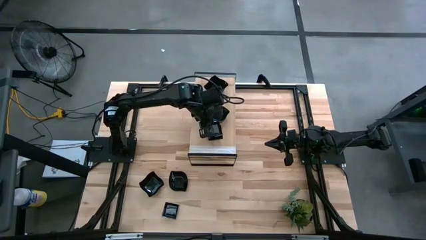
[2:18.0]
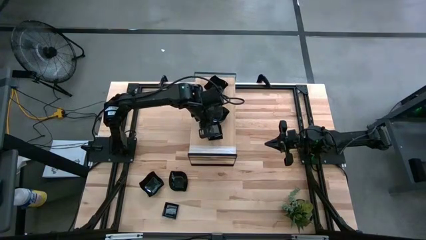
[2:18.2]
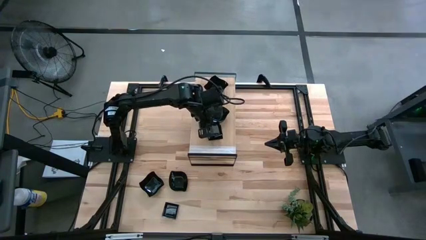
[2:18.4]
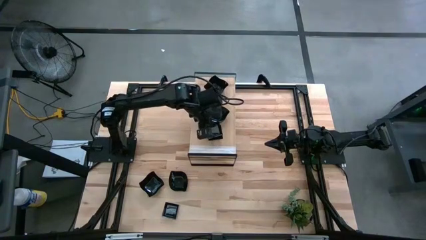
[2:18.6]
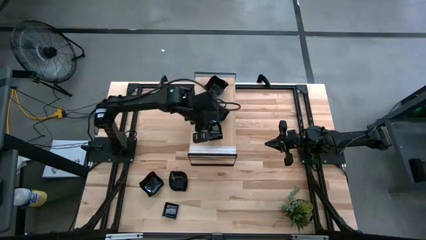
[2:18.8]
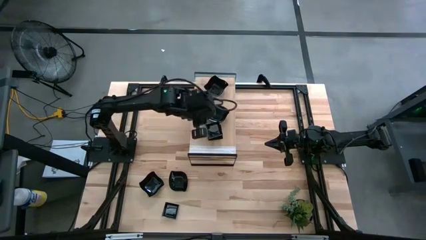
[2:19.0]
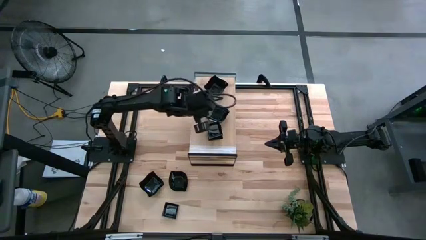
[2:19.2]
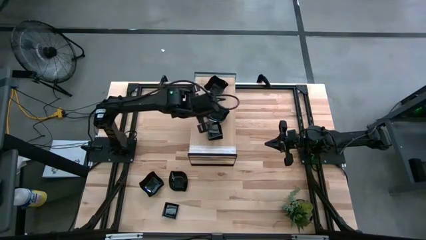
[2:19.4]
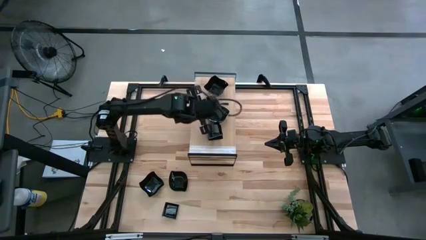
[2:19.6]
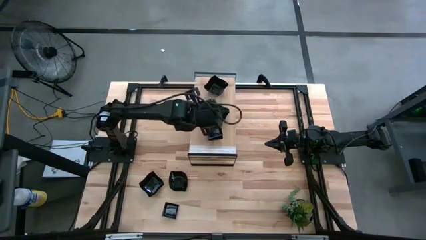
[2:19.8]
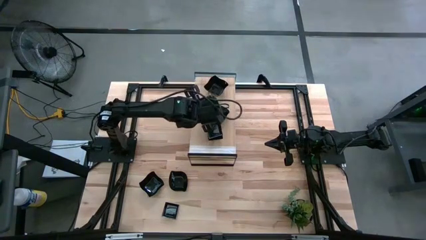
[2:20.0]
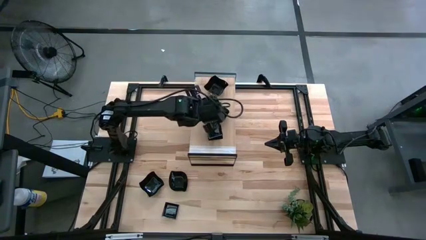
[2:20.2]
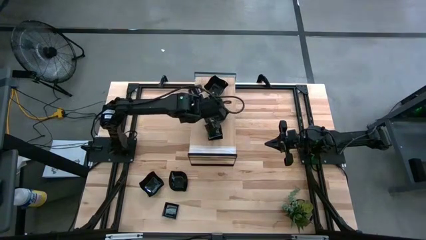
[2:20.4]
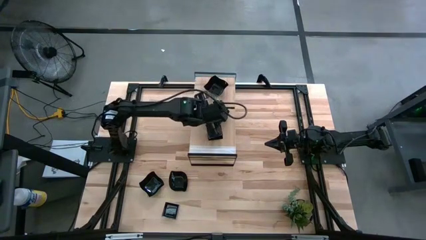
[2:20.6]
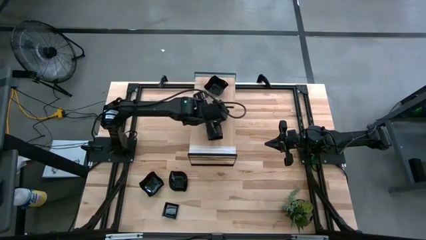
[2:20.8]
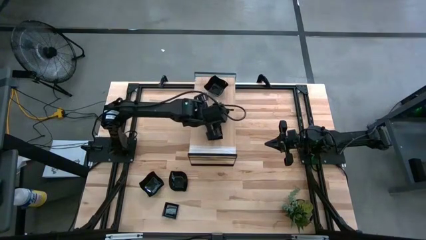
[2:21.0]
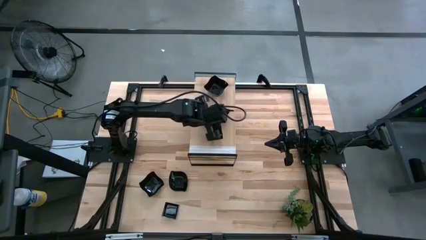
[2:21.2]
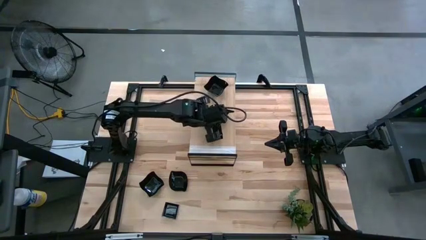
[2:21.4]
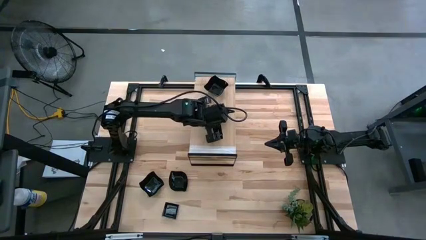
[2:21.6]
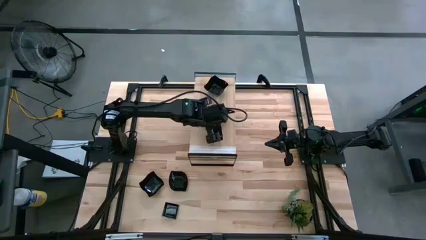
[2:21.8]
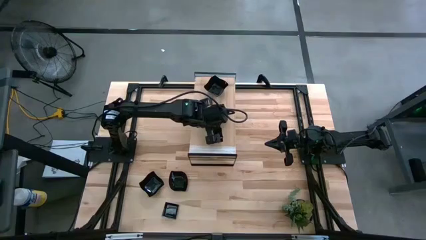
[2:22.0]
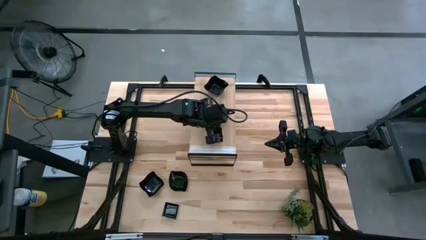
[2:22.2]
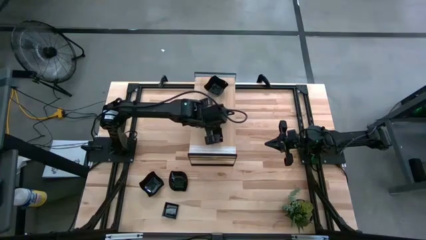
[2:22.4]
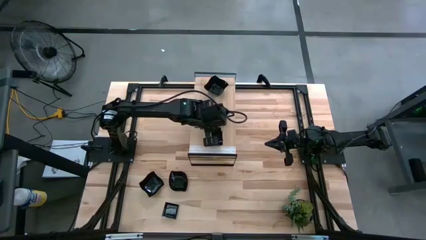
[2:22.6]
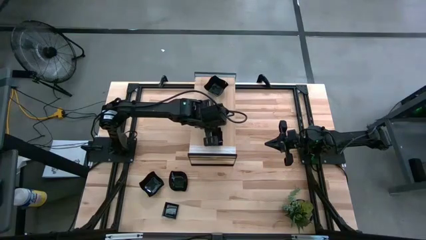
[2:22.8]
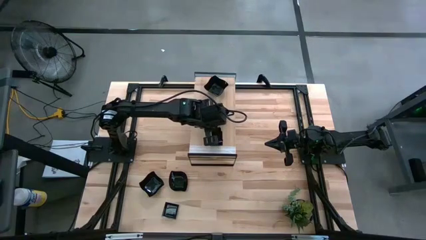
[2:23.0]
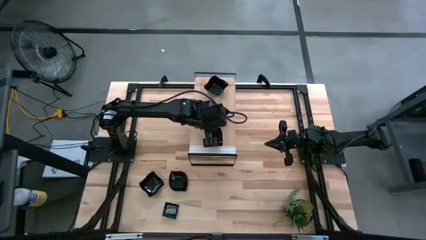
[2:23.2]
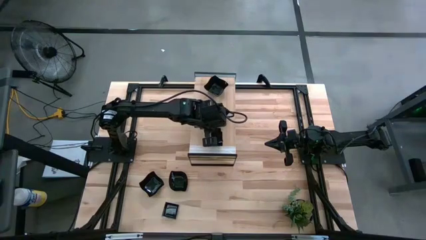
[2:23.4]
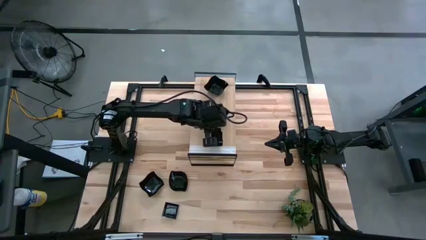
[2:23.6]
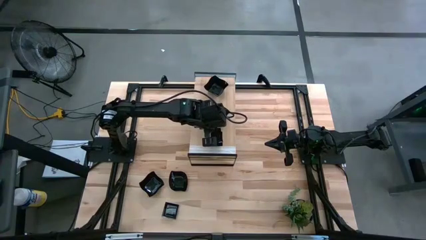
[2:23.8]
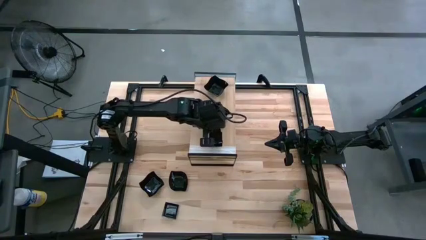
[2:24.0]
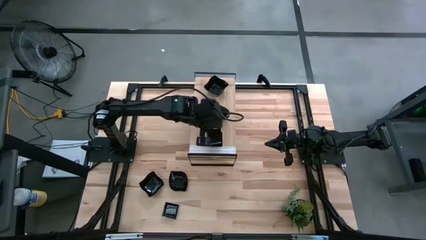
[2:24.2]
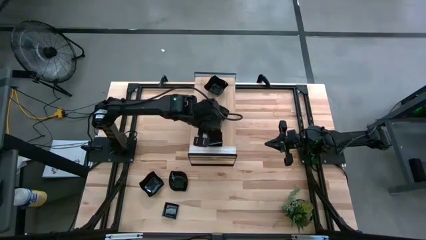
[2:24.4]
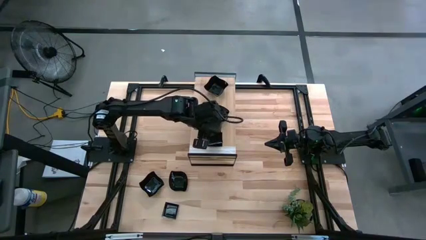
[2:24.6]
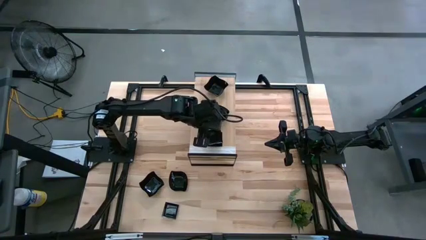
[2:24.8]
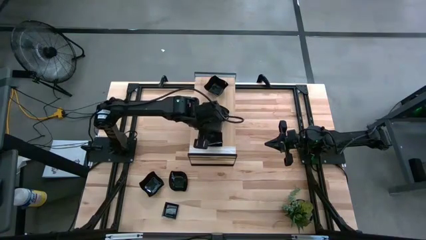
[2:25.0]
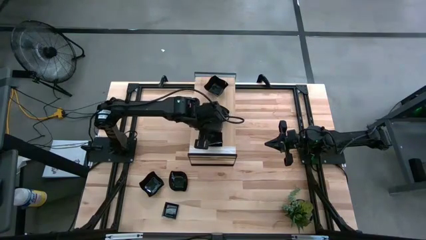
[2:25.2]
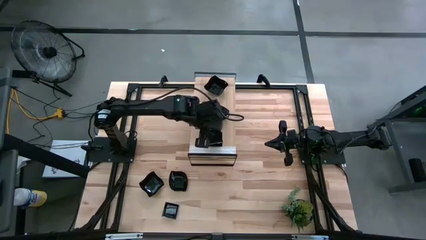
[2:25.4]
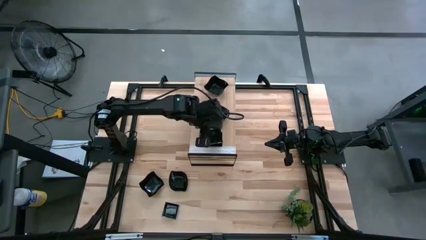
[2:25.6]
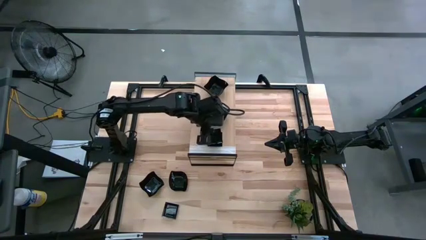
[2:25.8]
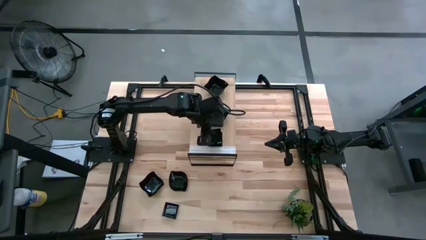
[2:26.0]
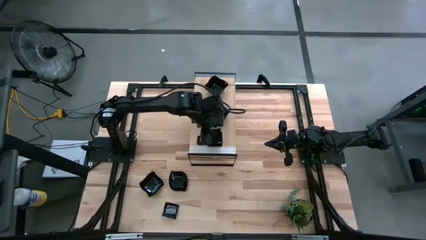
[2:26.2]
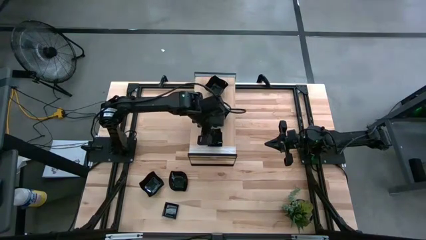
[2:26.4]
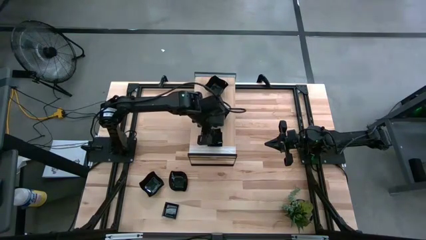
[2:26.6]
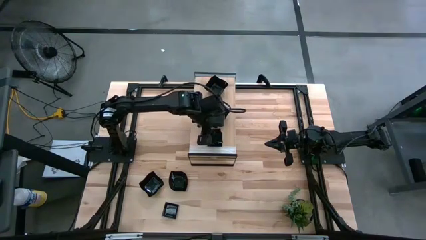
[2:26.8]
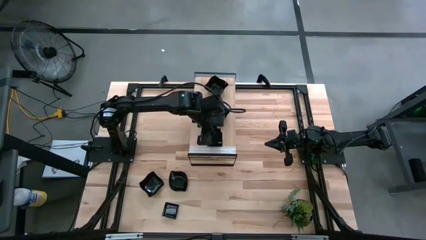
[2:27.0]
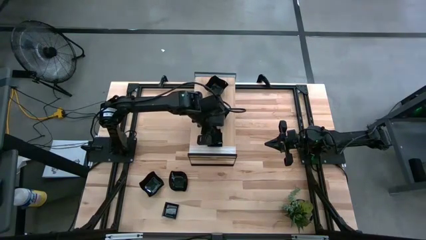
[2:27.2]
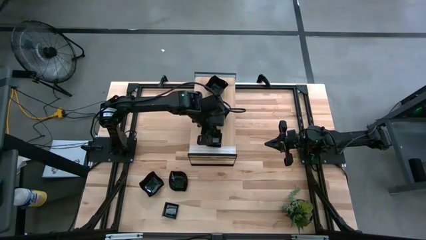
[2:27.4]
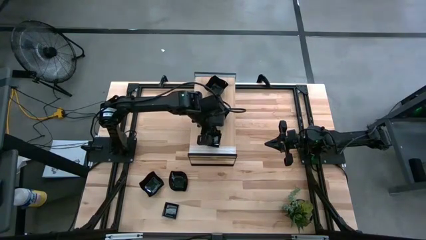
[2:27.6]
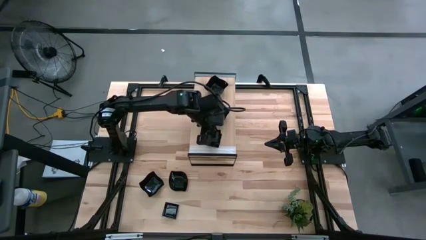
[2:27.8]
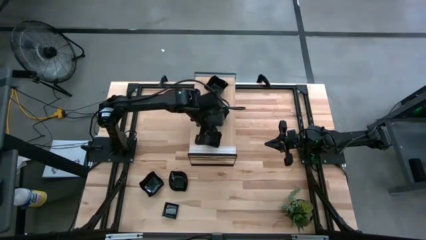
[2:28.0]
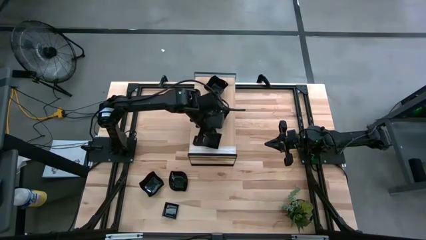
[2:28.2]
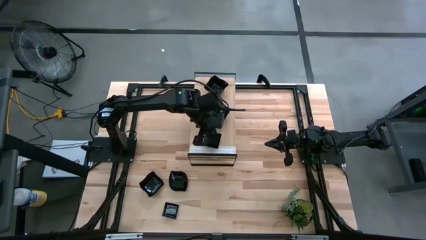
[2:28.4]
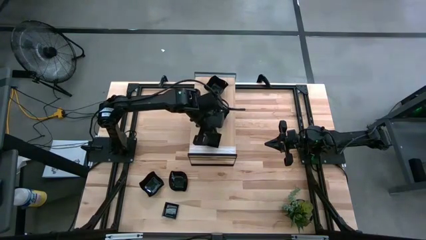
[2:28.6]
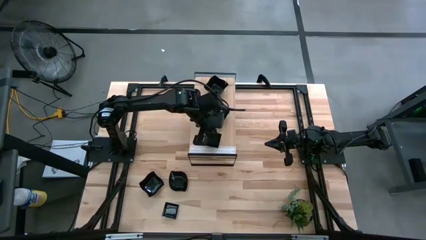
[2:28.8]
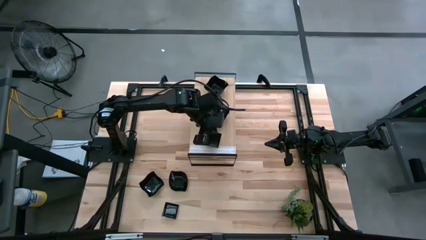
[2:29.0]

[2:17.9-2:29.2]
Task: Pick & Place Mini shaped plates
Stack the square-shaped plate on top of the stacked square-shaped plates on the shelf

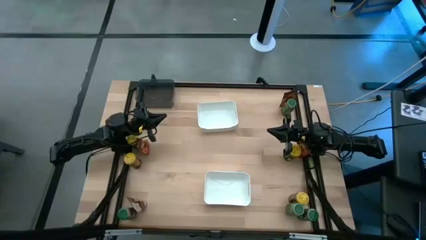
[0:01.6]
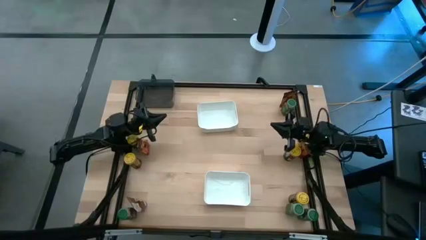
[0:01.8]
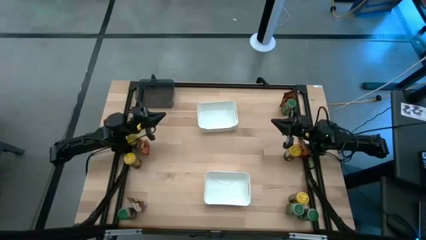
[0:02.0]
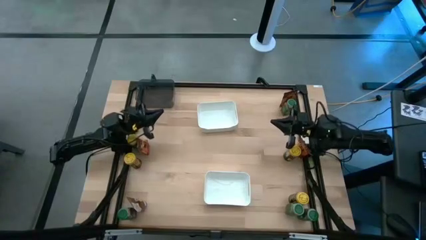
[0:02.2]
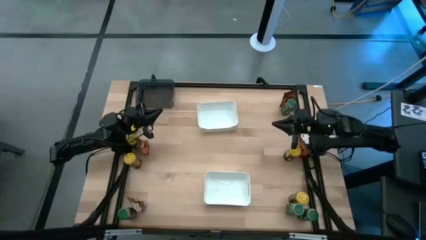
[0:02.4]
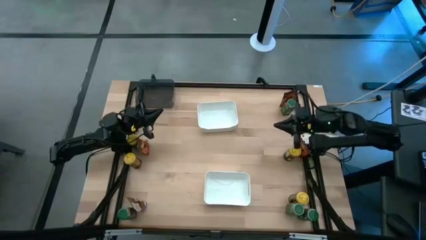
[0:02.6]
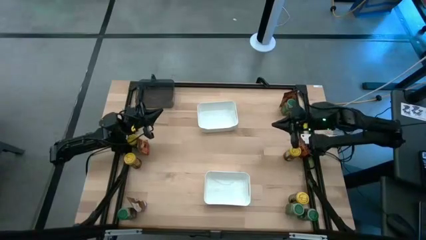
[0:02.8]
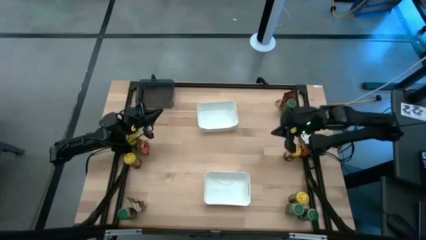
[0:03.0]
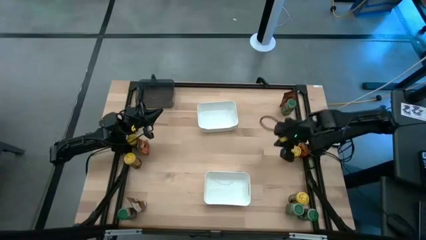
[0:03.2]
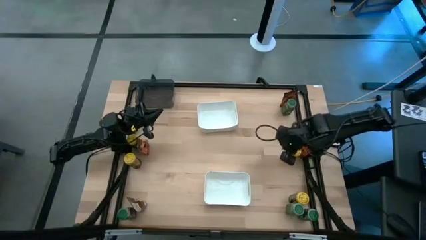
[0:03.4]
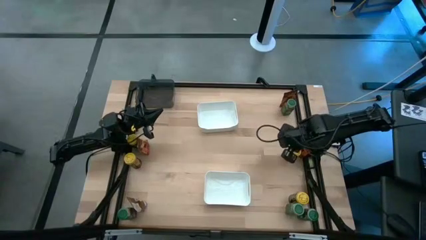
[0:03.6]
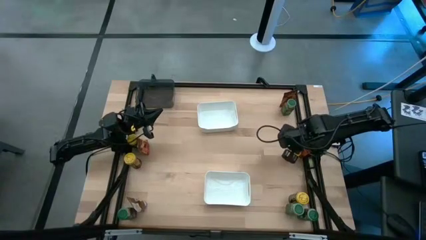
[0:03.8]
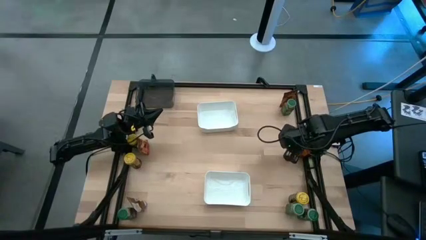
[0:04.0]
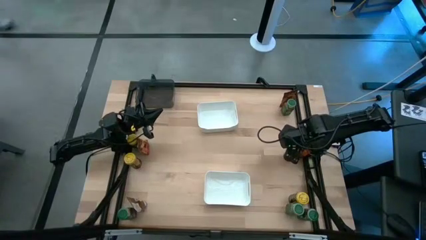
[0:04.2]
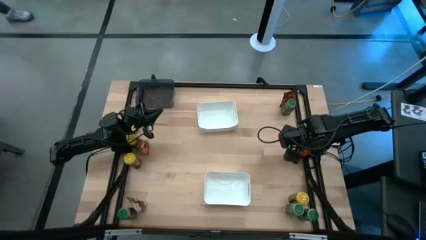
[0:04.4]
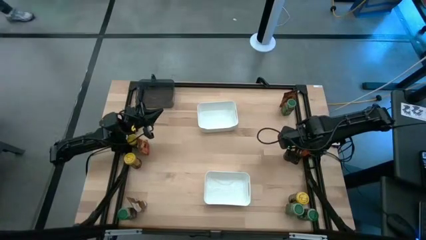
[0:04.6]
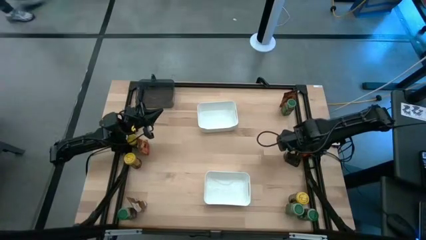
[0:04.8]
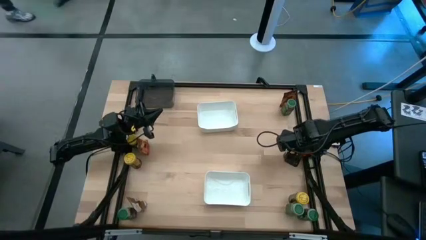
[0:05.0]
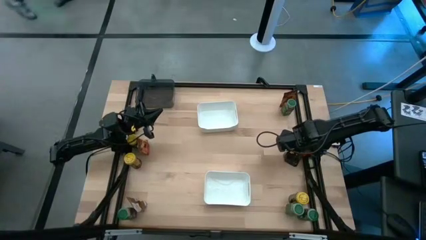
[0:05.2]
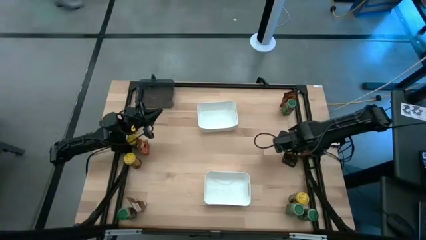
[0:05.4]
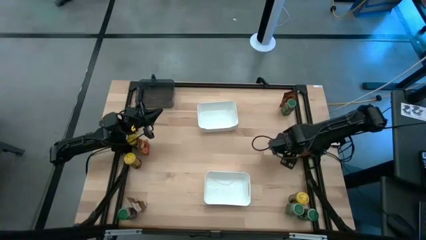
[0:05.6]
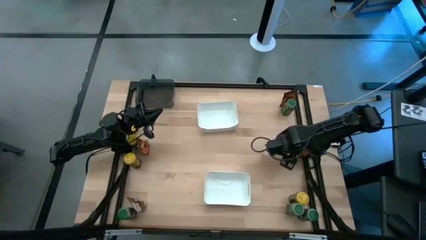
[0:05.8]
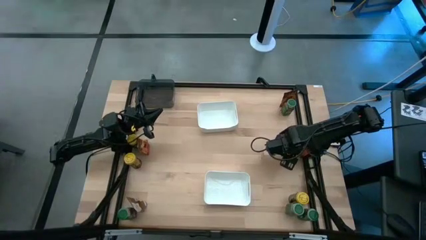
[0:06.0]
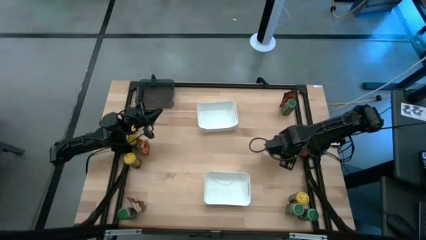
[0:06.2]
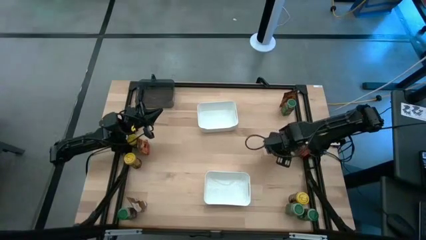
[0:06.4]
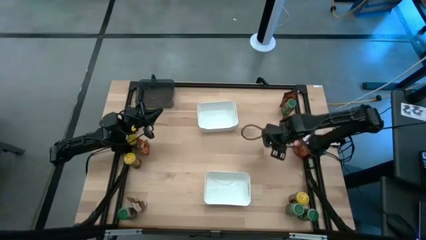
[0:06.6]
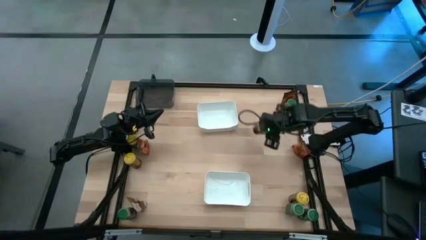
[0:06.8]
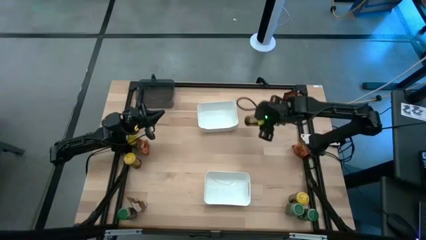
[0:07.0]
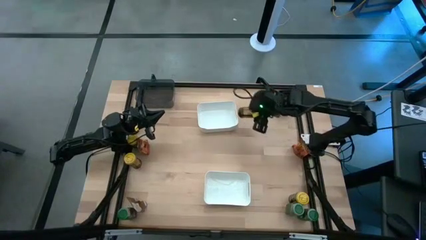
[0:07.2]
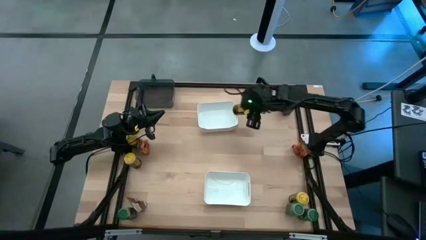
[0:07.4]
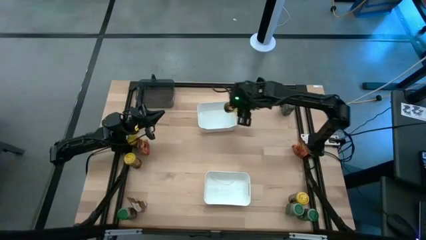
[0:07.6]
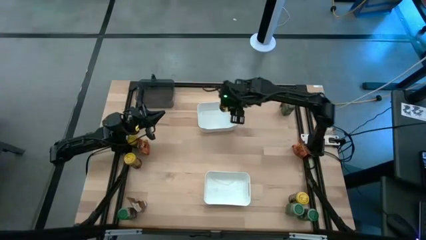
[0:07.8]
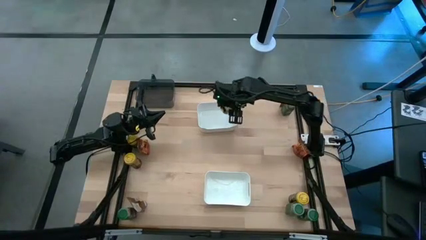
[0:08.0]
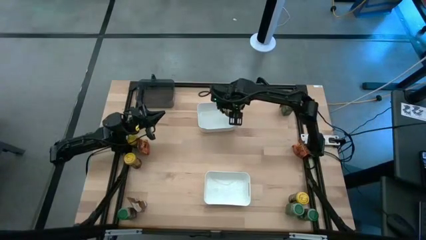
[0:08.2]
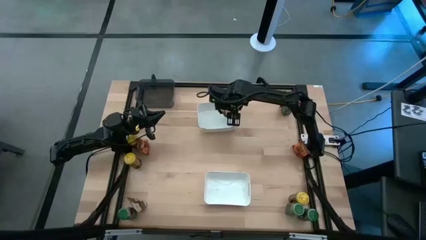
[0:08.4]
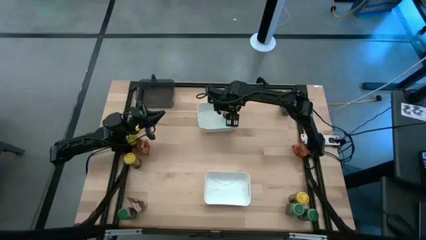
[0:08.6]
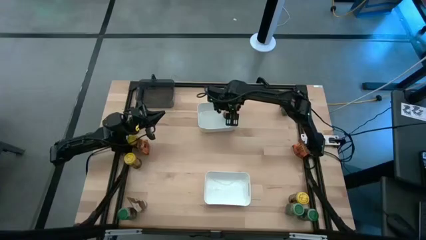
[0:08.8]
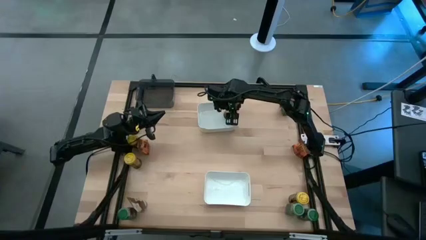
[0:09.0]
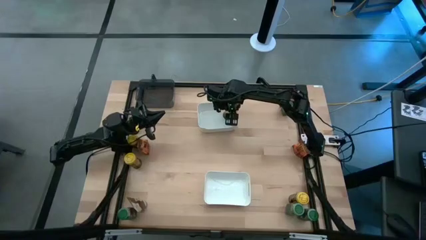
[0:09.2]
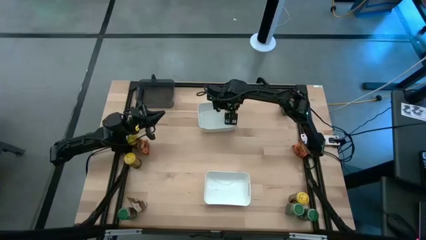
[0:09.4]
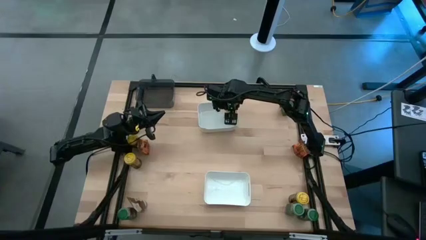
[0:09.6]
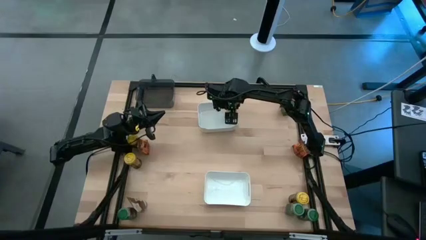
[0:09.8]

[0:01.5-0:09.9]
Task: Sort spices by type
Put the yellow seasoning bottle into the top white bin
